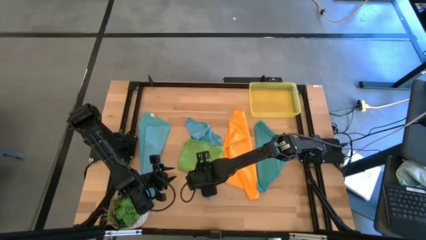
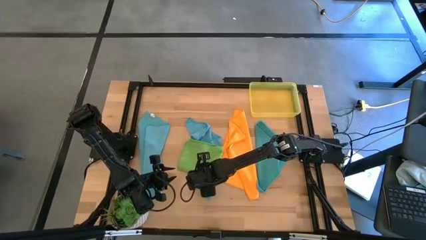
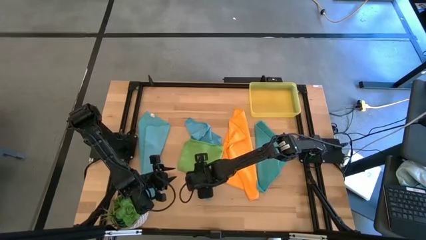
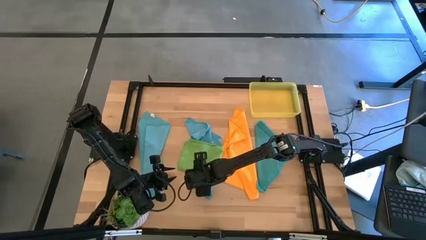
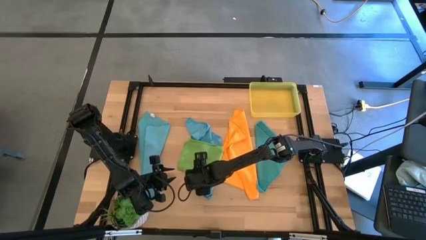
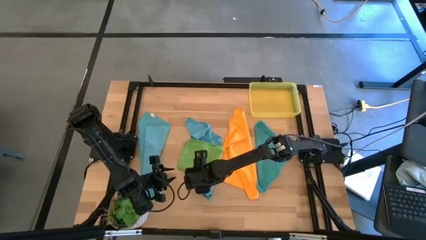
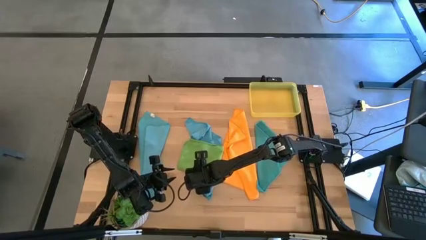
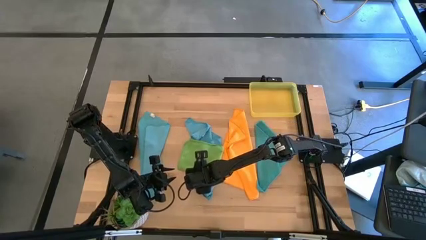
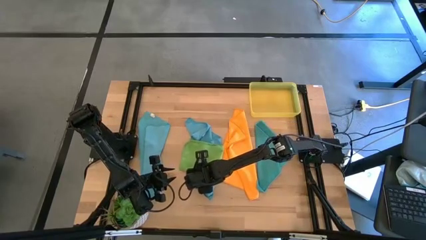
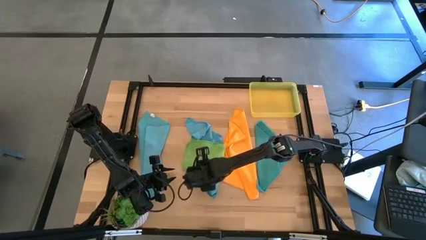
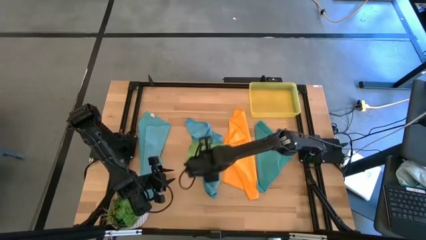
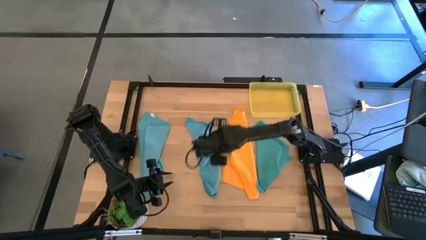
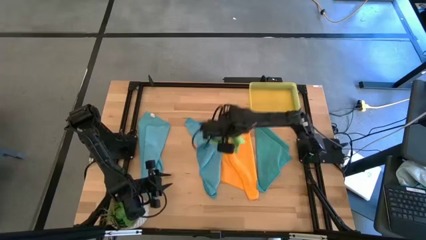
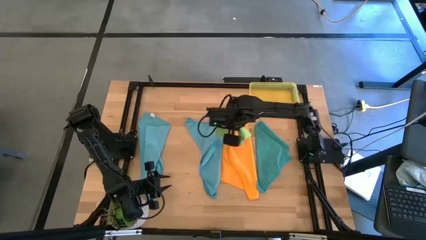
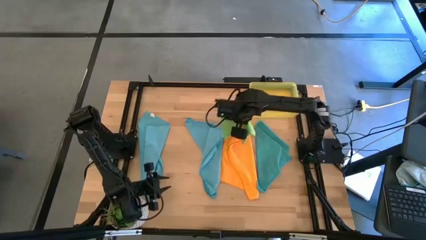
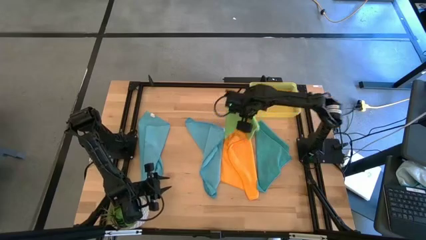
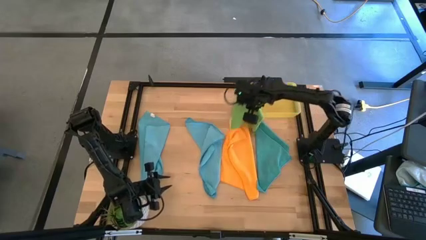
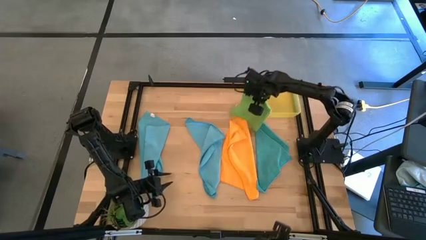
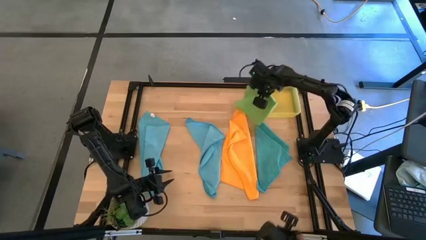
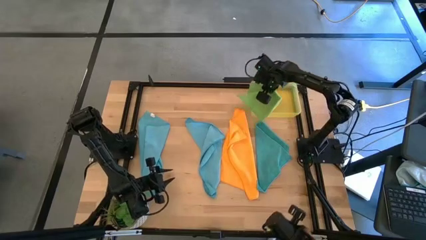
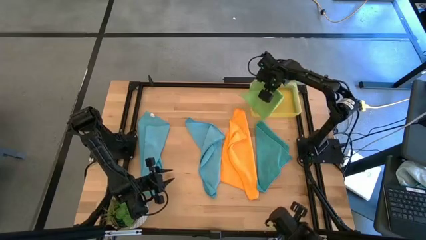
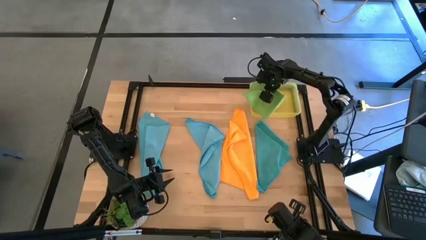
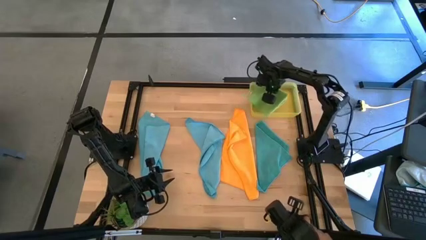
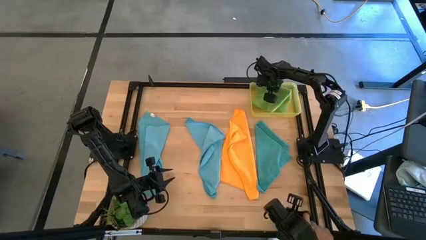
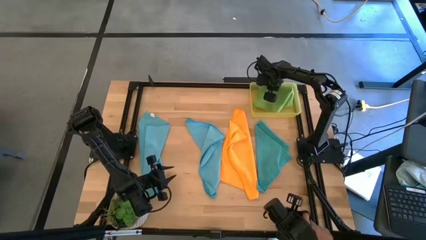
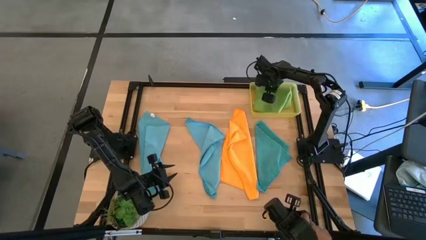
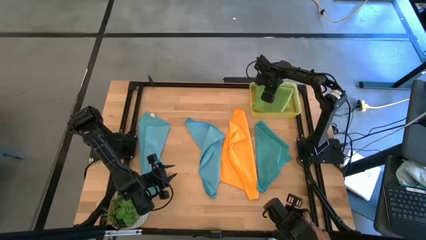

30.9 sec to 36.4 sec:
Task: Fold microfiber towels
Put the folded green microfiber cloth into the yellow bin

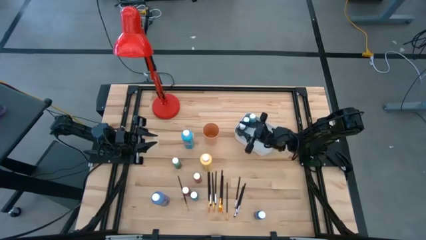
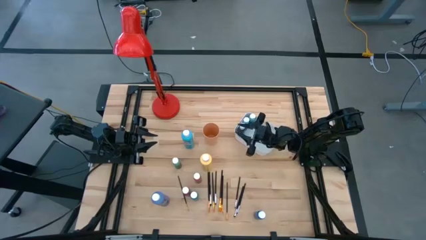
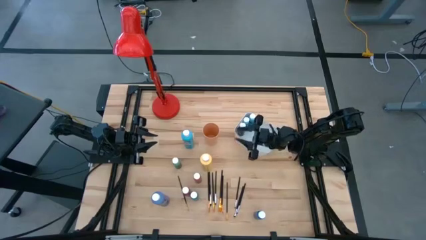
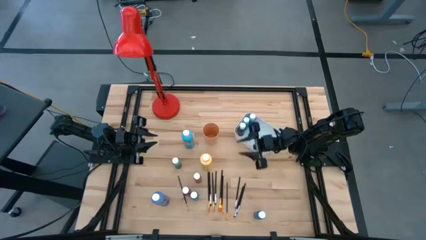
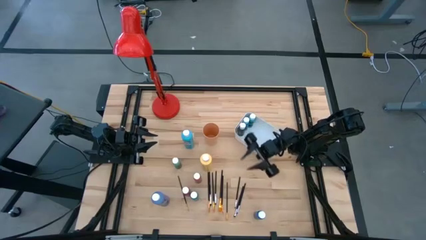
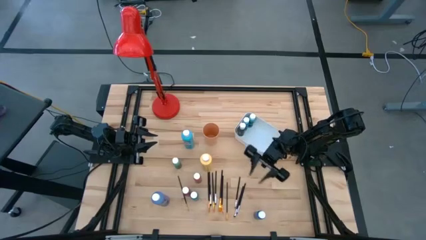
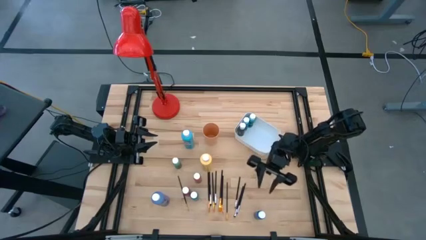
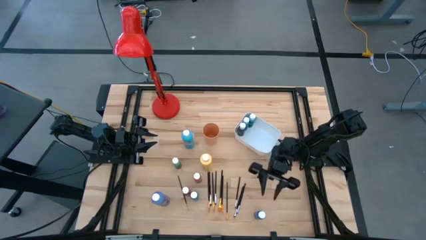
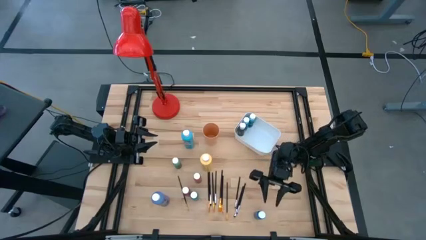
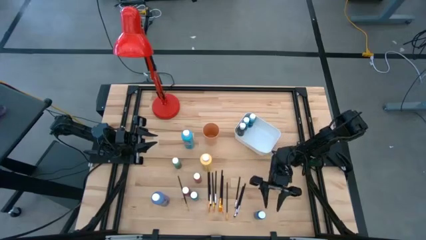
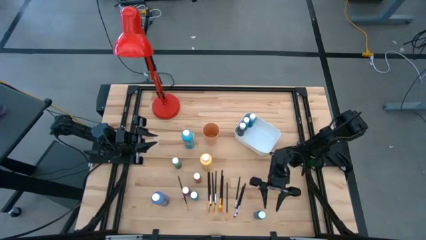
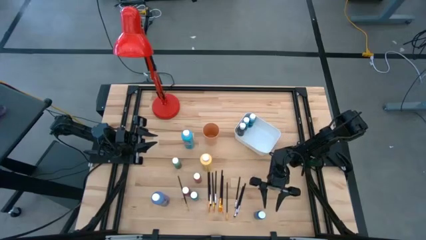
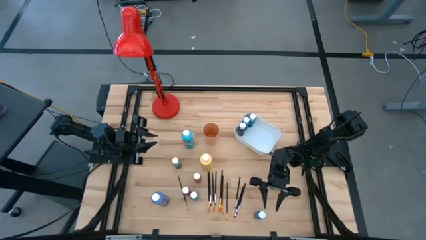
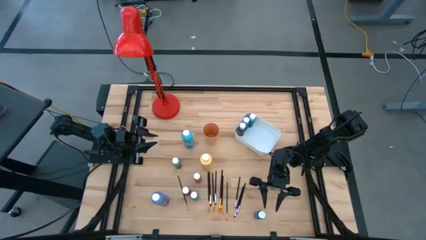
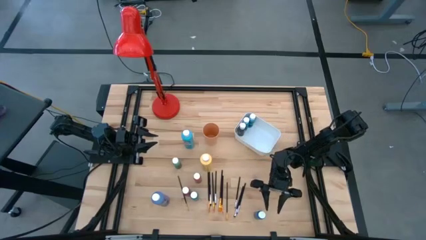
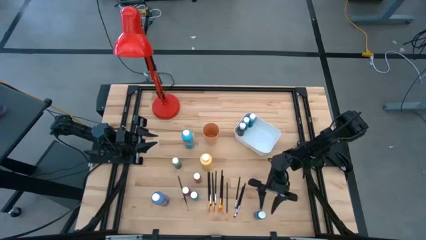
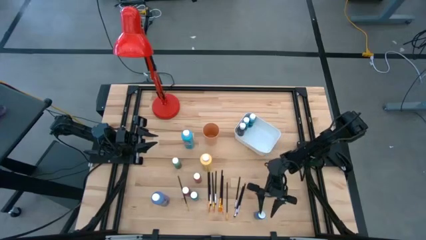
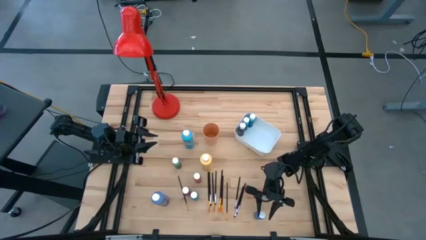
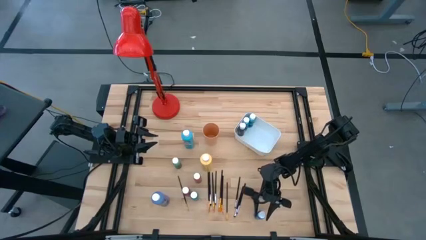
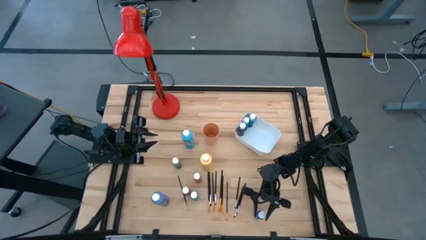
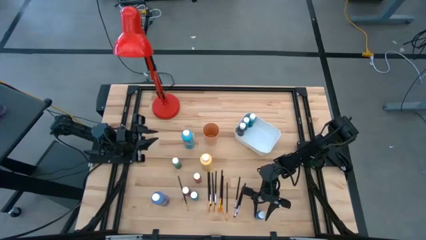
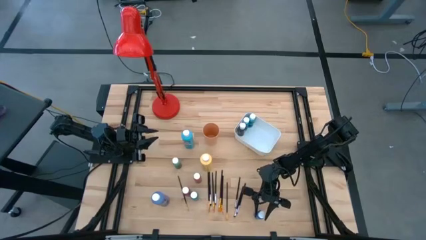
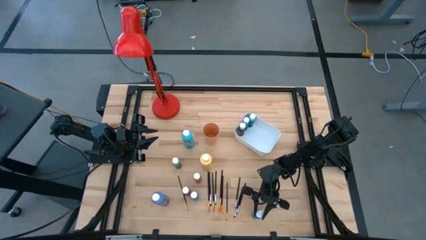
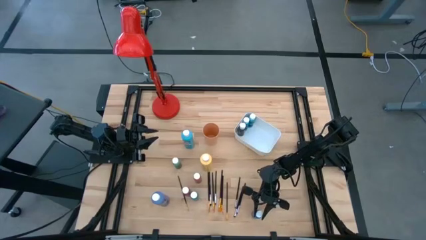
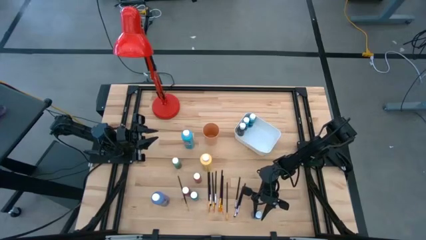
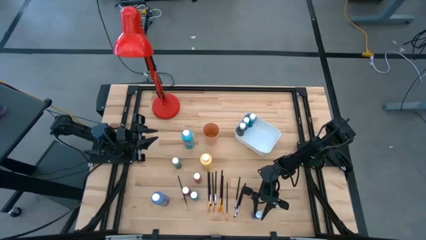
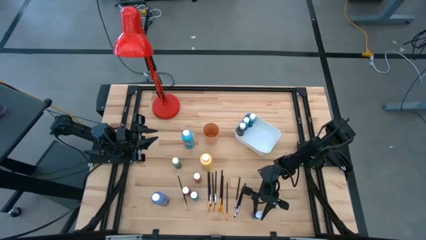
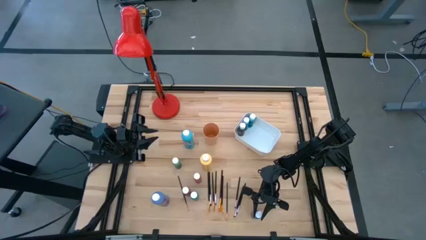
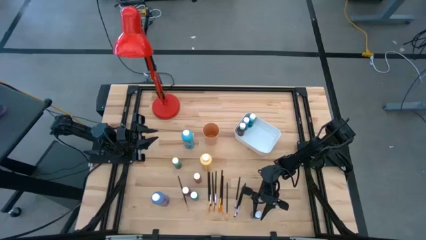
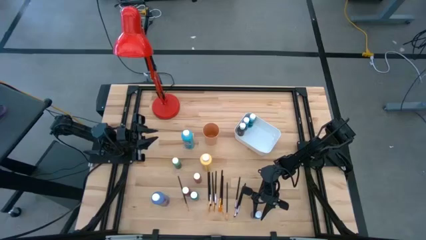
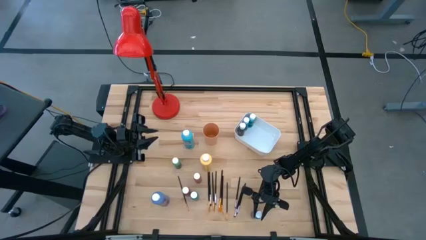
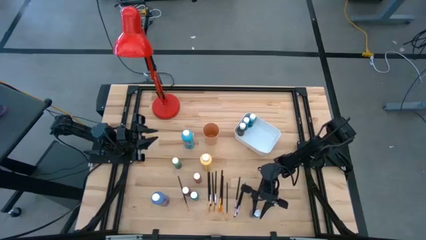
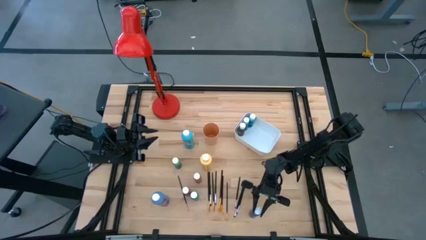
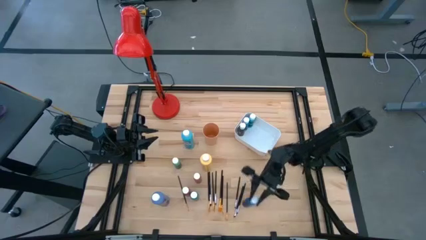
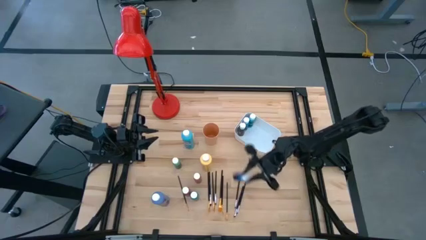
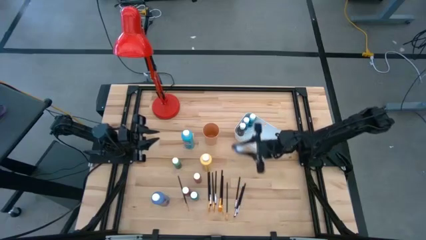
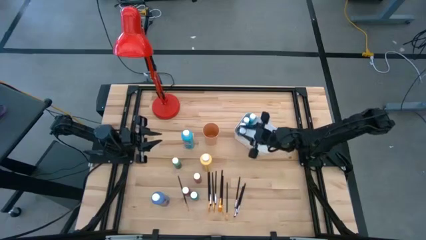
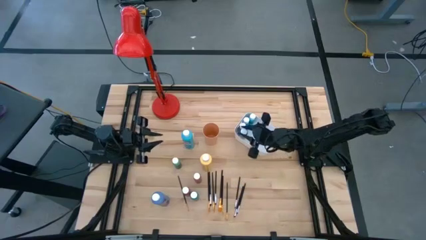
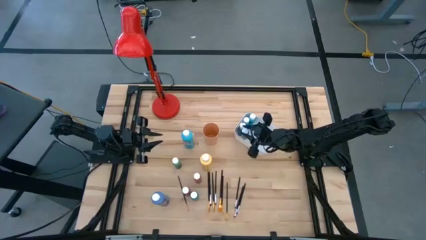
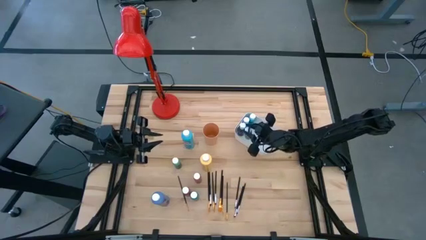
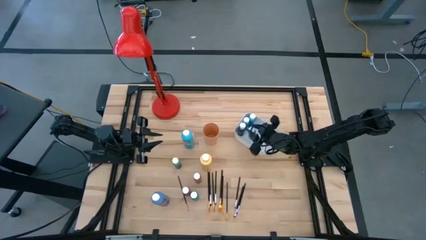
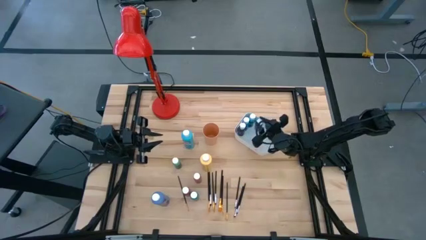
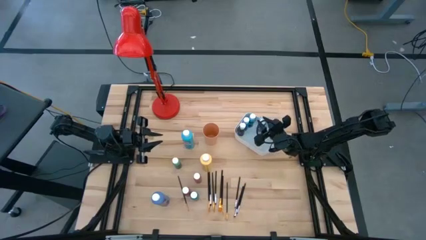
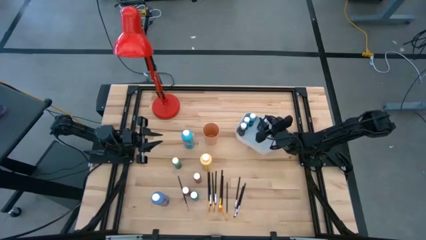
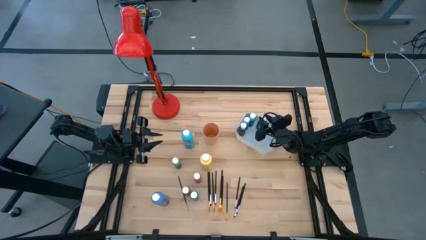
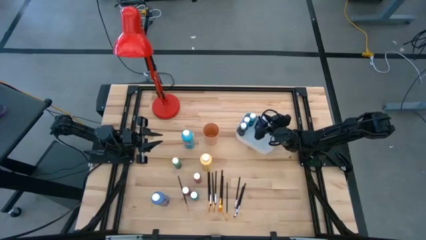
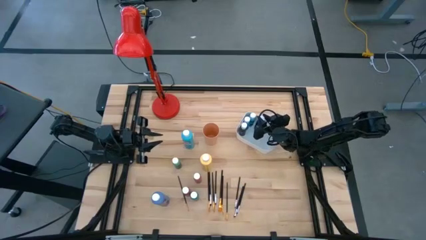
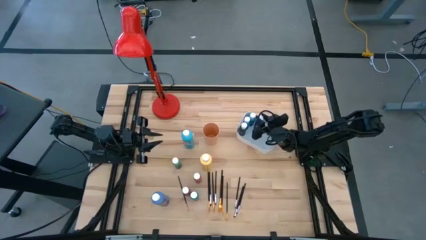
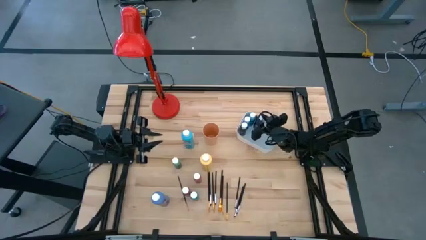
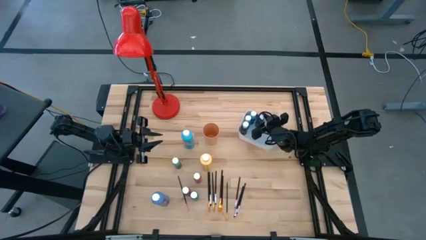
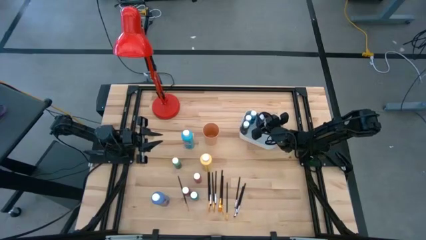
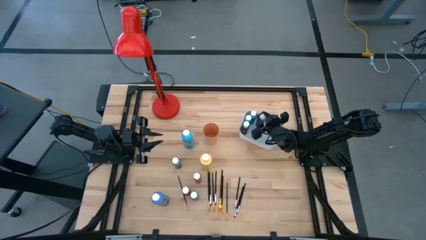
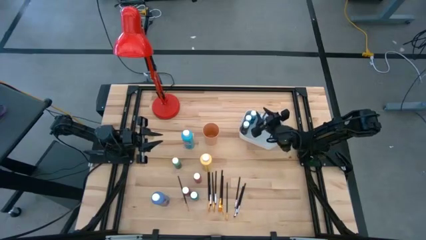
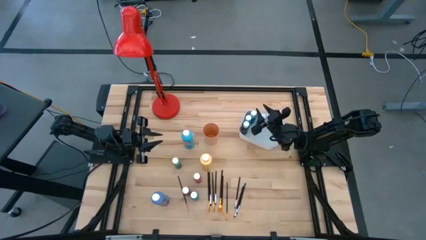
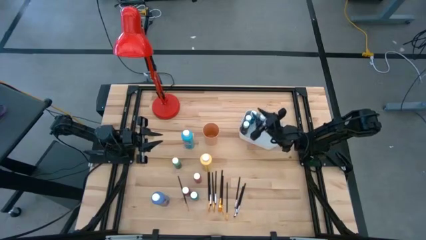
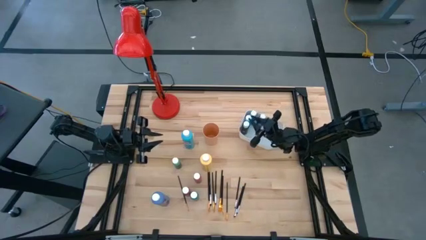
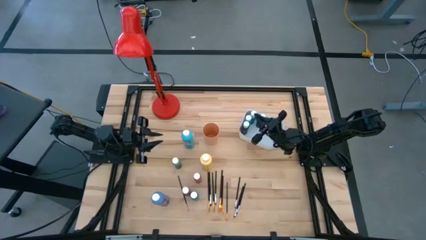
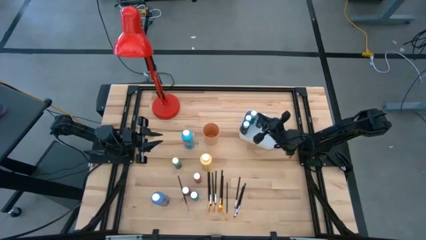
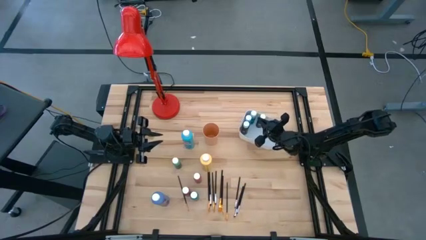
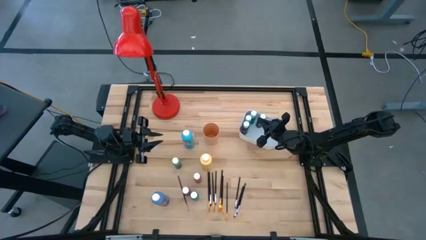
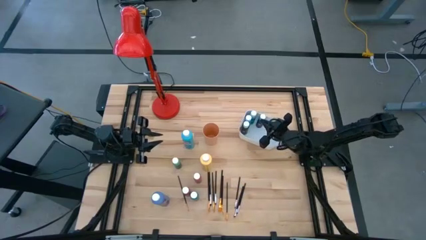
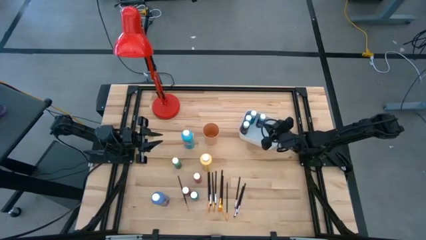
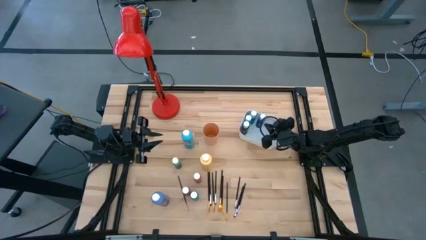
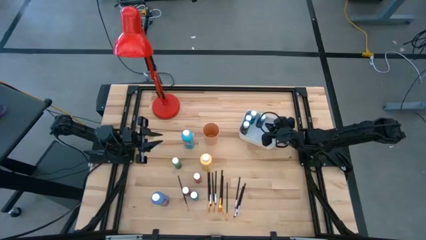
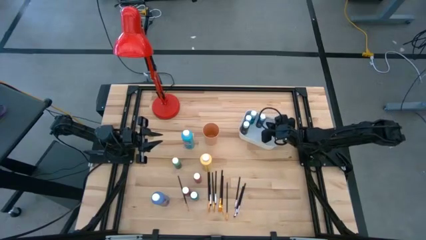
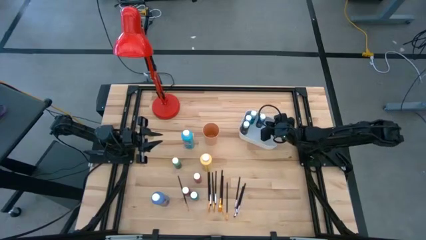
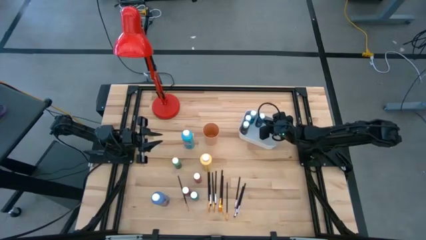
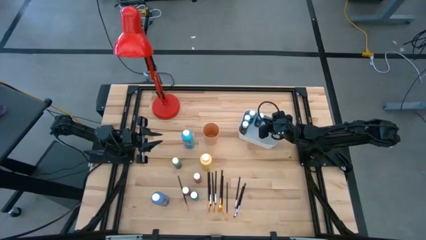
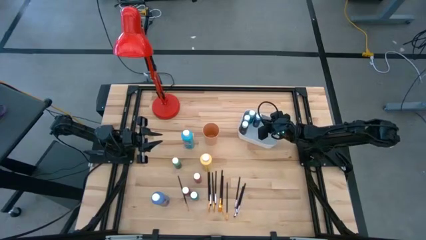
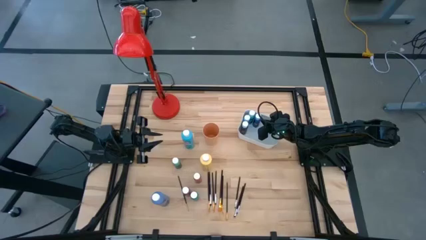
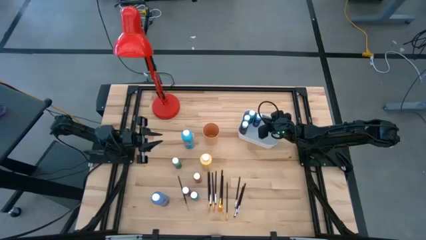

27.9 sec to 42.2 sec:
Task: Pick & Place Paint Supplies
Put the dark blue paint bottle into the white bin
